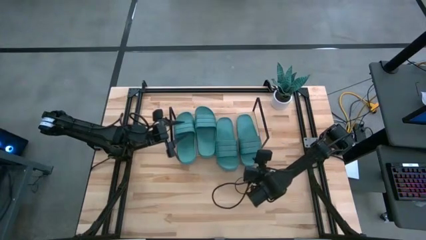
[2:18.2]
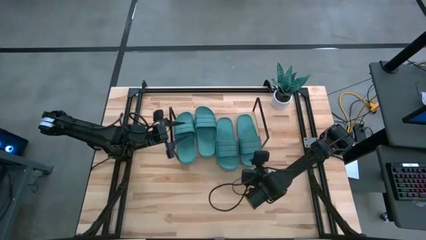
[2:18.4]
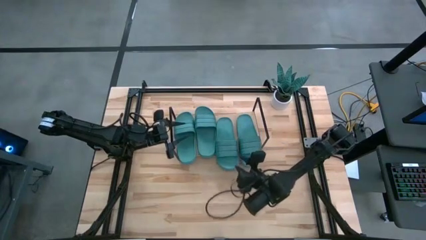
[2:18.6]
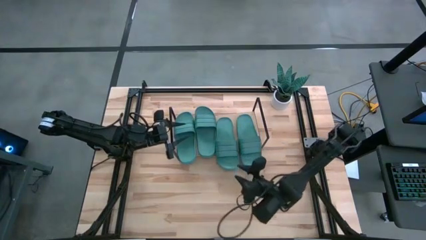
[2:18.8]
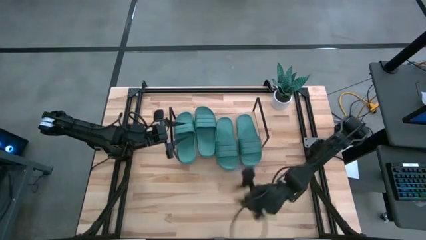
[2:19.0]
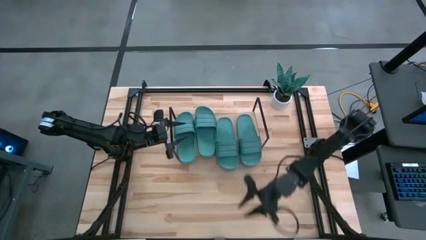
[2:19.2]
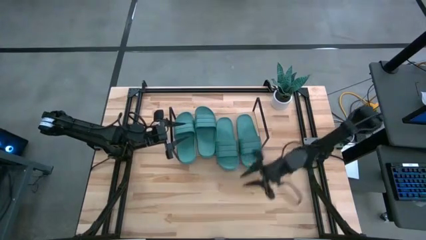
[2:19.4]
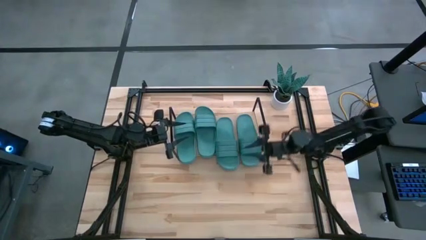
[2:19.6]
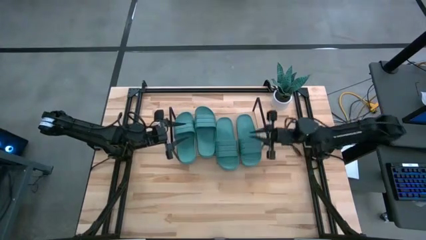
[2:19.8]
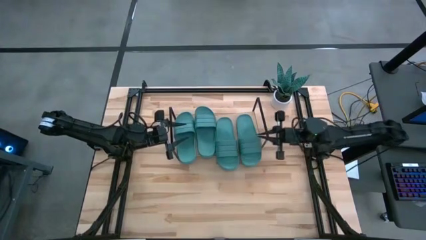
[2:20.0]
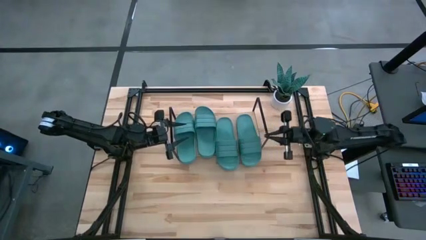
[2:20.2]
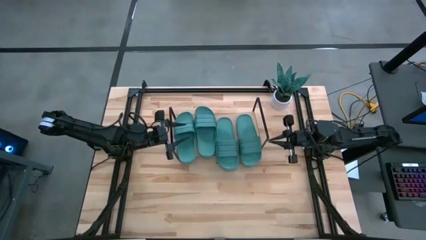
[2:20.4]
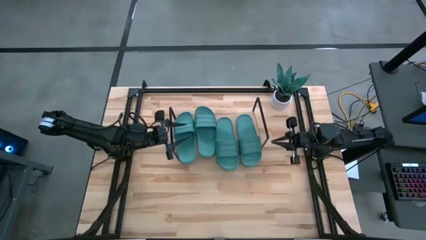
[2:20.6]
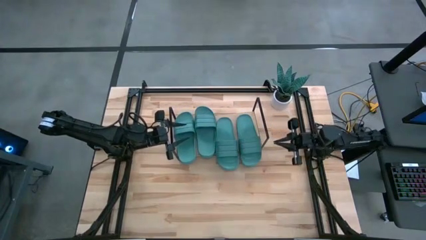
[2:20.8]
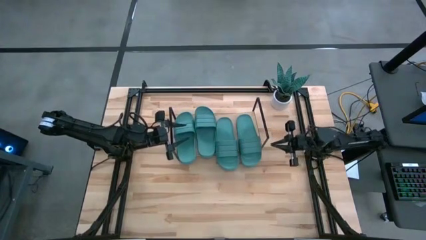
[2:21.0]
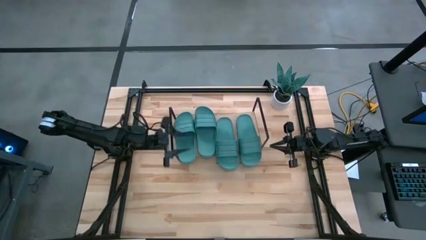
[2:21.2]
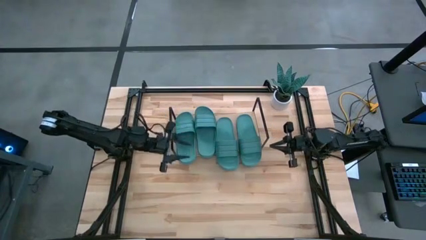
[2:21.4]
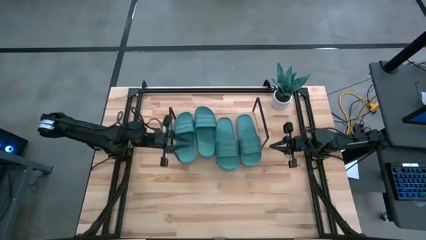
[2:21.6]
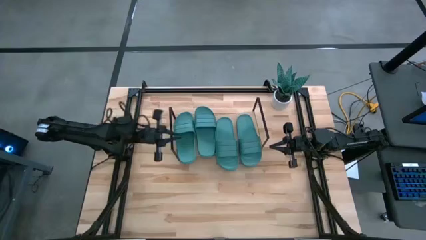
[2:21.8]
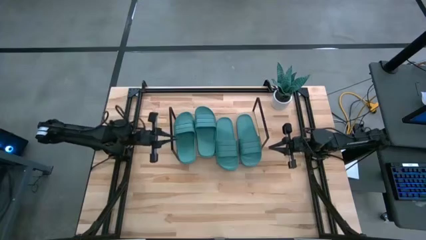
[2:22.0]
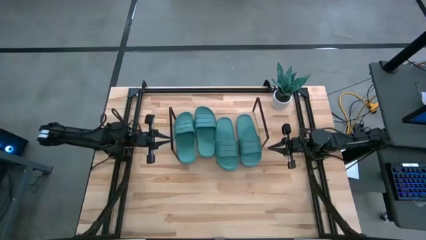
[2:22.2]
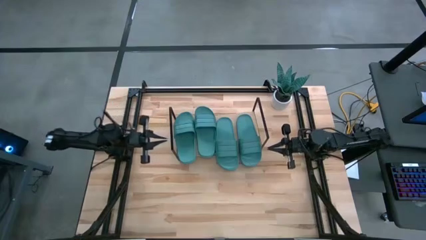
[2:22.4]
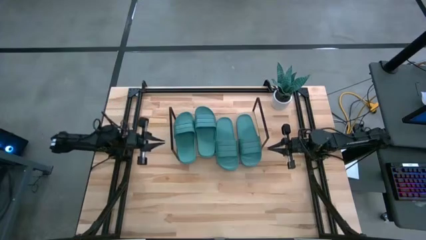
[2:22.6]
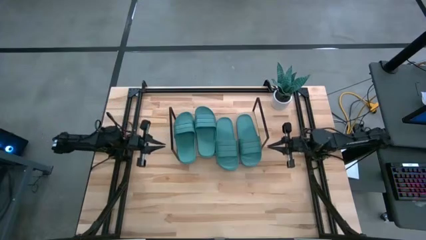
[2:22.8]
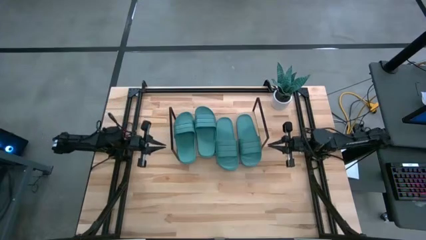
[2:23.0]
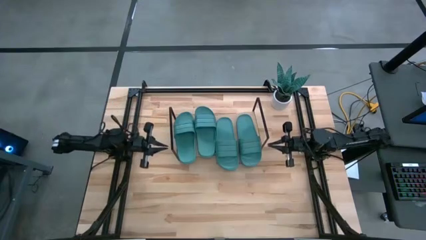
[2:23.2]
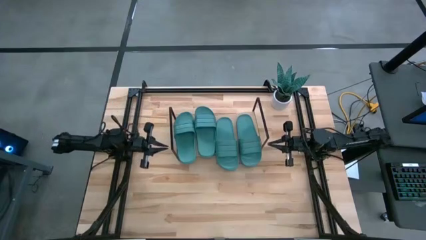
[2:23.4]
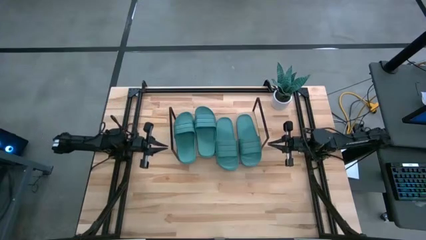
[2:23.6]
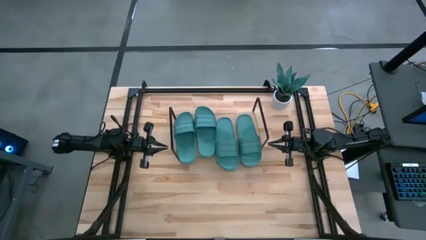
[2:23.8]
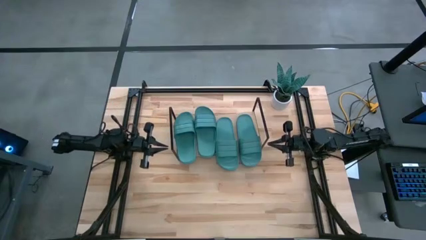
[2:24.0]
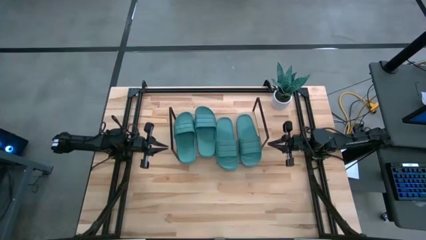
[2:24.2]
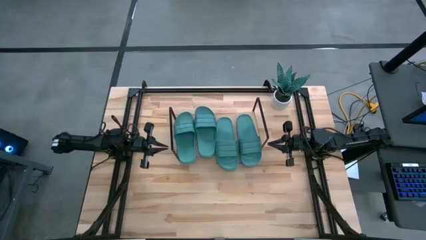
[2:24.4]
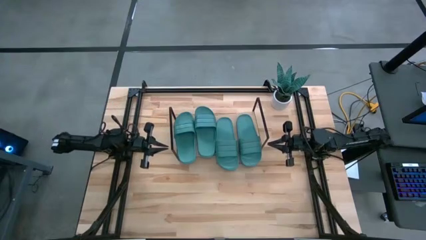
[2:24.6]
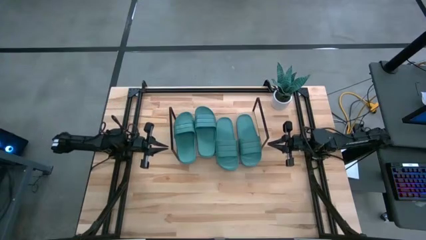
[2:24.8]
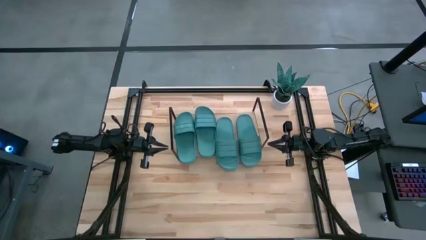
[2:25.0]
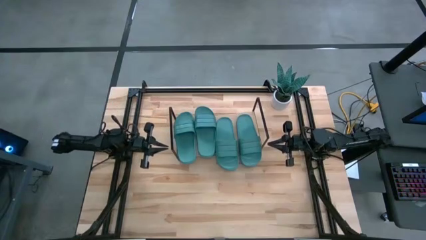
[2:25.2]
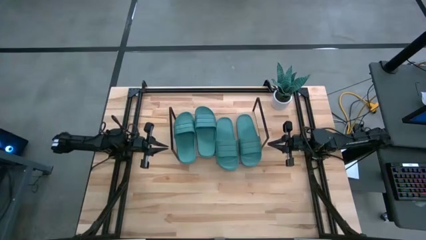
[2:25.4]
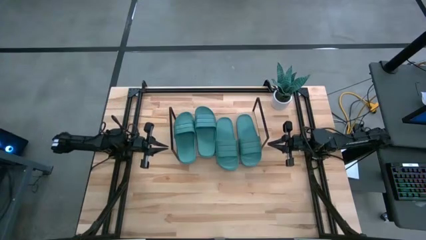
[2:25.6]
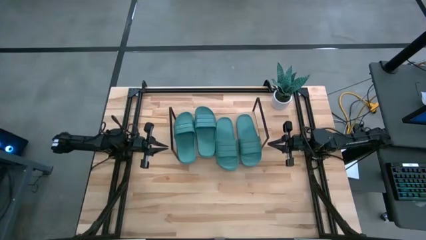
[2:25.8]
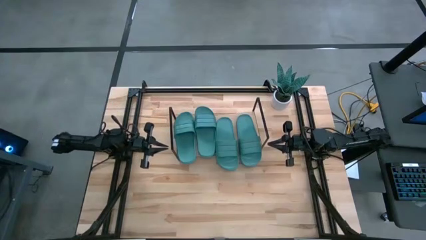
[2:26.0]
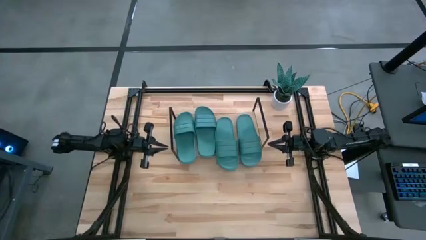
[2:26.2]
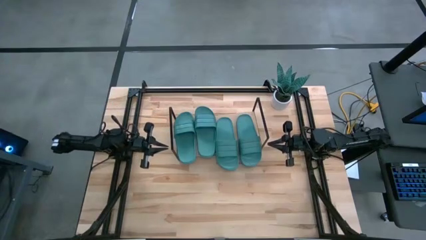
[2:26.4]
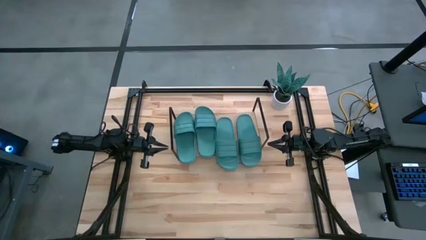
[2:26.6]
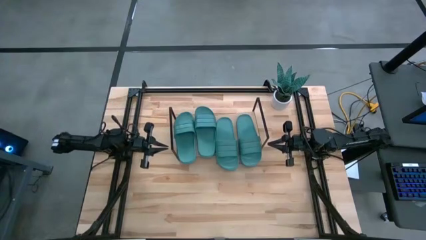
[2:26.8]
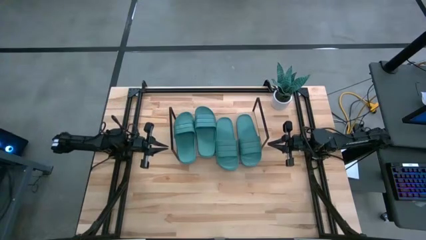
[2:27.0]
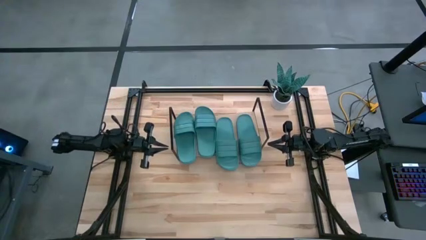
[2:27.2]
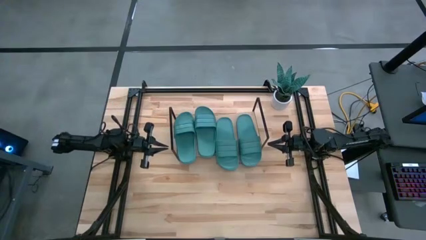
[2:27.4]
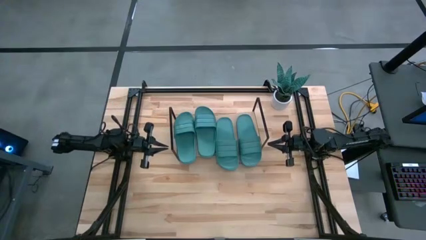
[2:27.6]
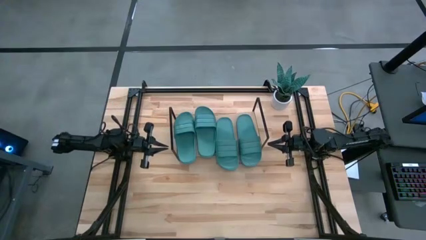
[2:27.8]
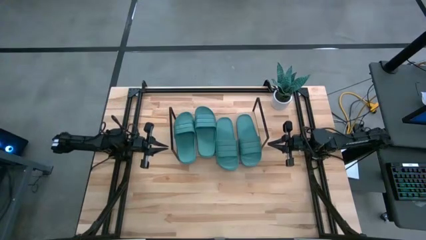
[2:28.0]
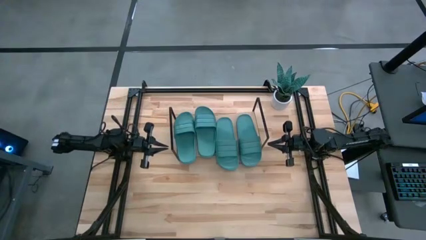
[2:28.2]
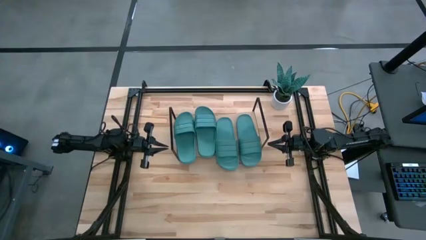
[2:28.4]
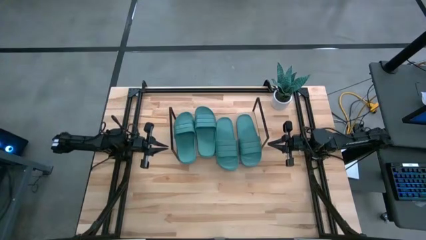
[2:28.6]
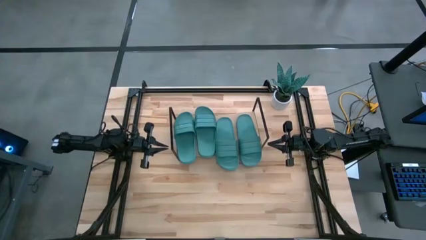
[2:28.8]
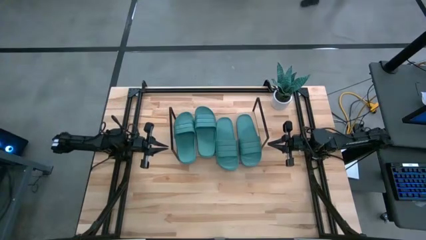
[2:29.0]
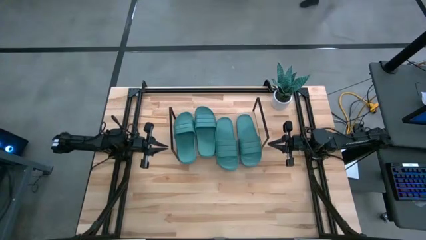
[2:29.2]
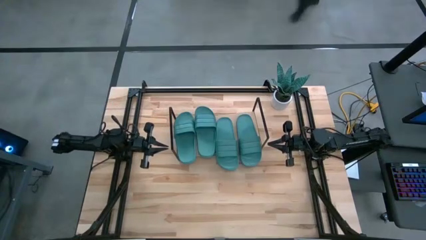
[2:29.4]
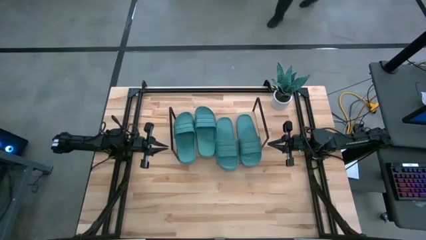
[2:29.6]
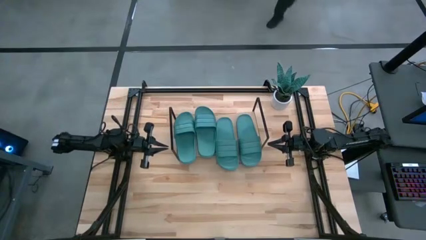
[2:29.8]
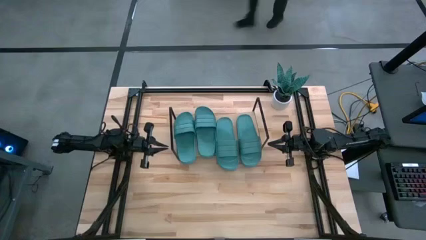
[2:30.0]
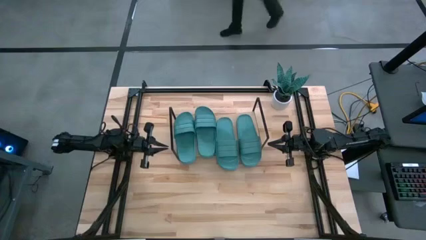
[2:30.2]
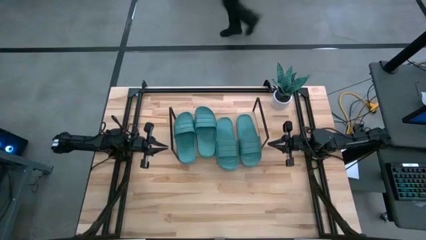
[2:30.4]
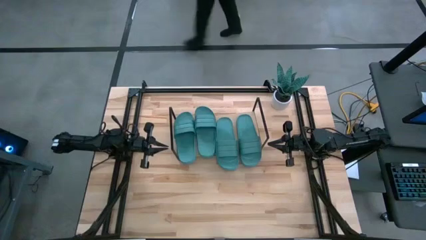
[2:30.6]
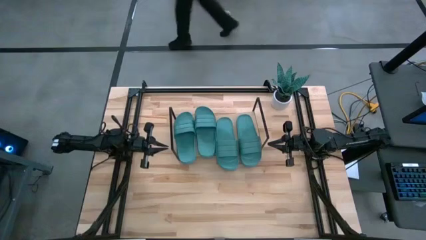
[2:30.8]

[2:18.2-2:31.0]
Task: Pick and place slides into the shelf
Return to Home Position

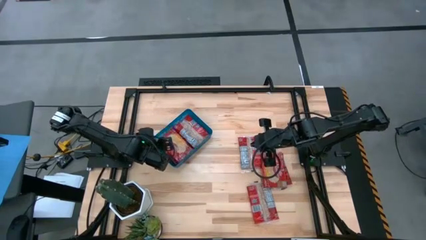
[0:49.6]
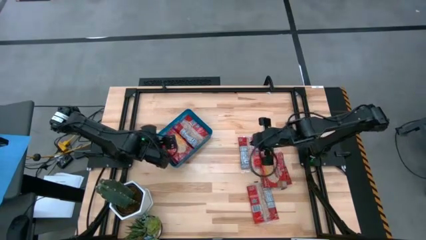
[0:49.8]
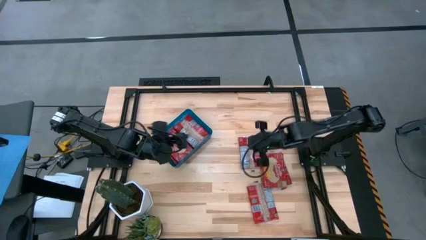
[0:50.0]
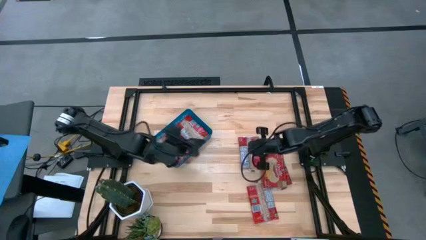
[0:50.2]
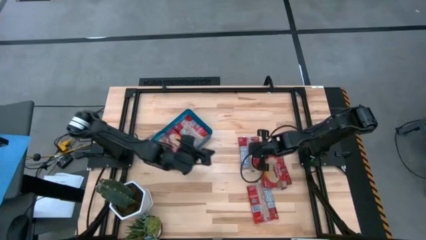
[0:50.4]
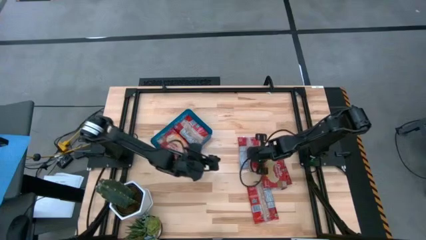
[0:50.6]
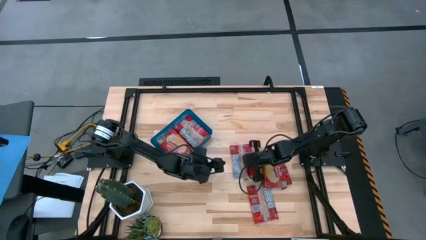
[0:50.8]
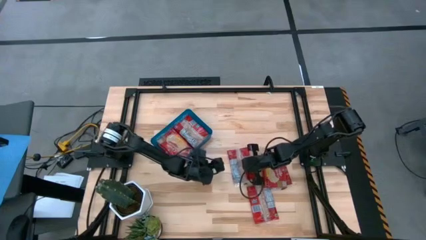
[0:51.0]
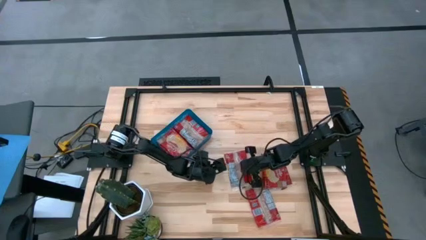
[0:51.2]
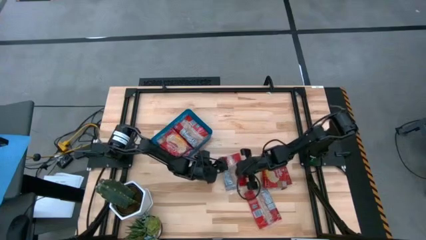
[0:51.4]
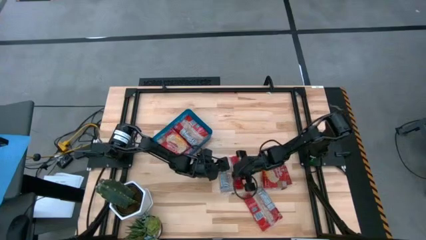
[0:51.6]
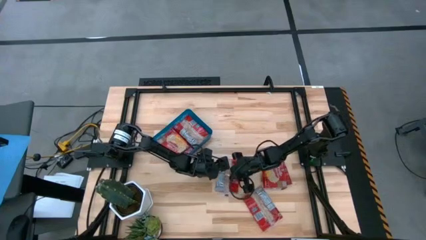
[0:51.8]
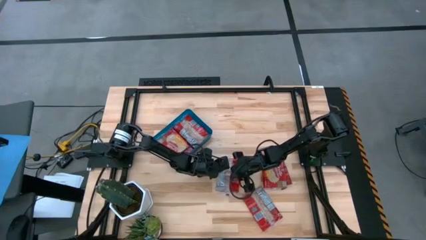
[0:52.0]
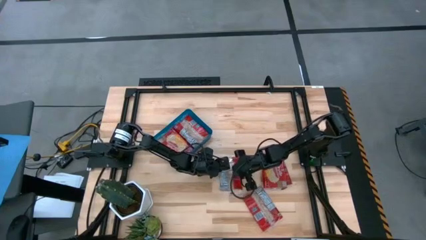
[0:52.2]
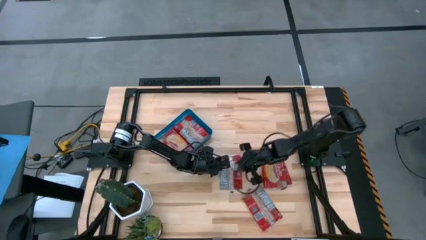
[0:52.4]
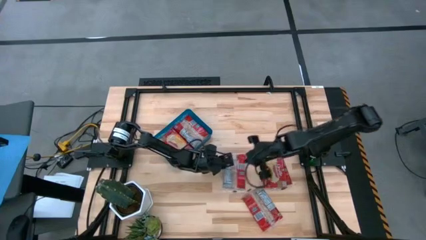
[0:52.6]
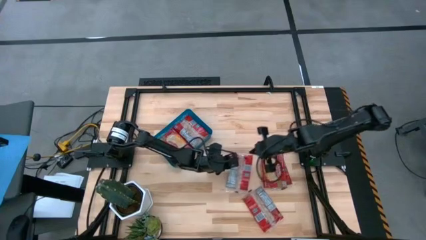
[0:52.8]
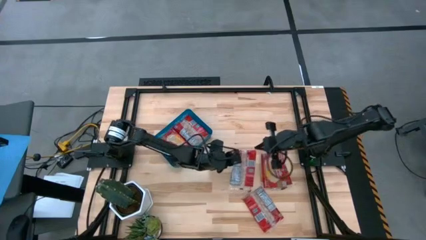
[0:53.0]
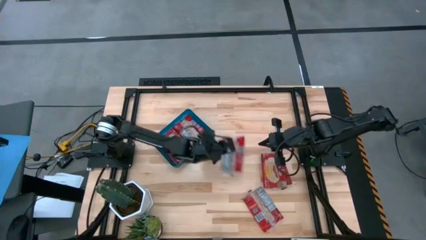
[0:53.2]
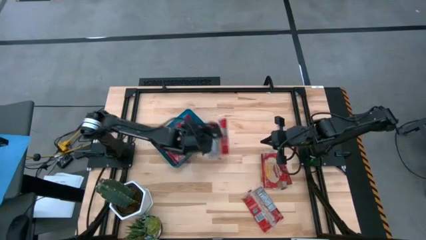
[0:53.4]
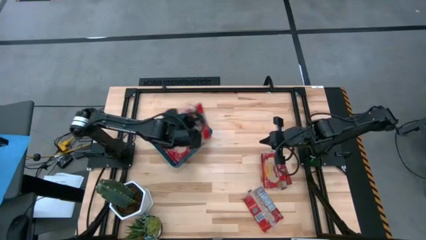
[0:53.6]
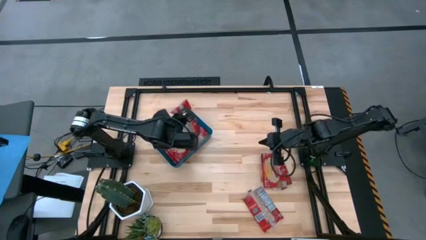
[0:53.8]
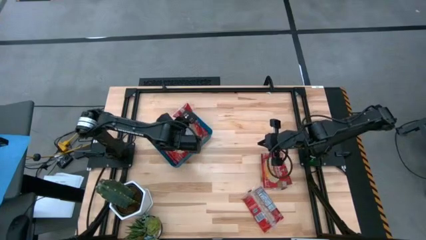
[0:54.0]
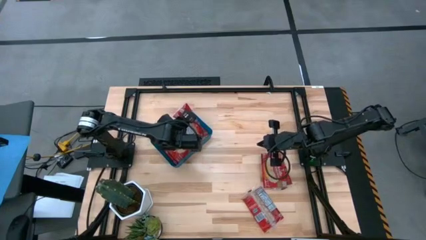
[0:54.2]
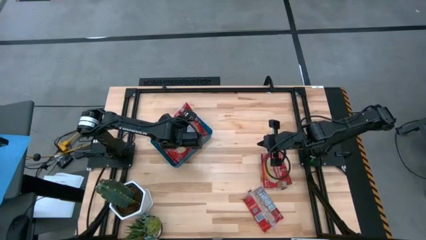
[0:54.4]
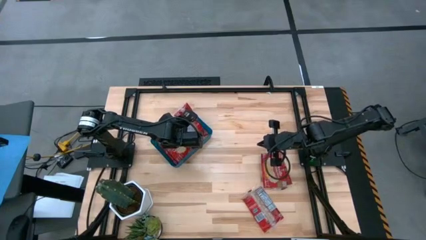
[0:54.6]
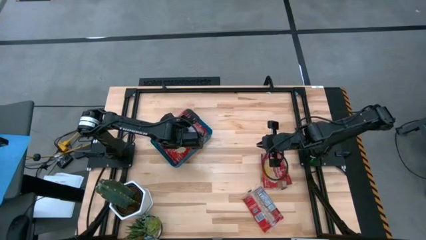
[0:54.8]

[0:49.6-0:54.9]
Task: Sort popcorn bags into baskets
Put the red popcorn bag into the blue bin
